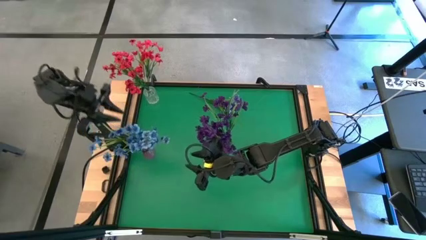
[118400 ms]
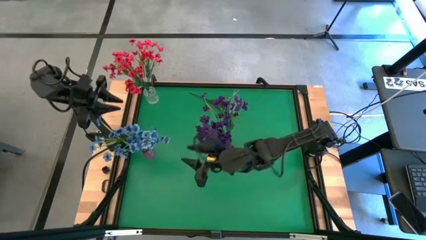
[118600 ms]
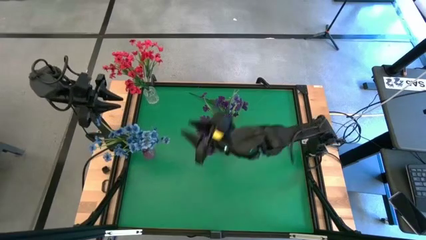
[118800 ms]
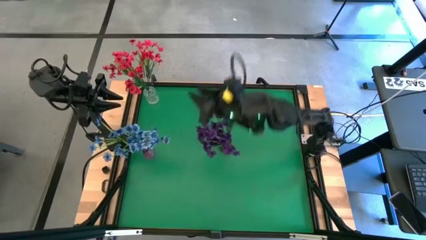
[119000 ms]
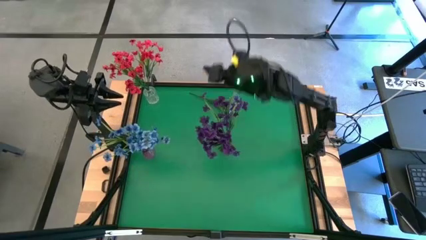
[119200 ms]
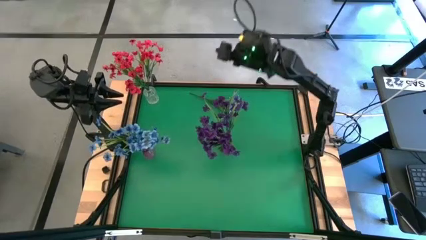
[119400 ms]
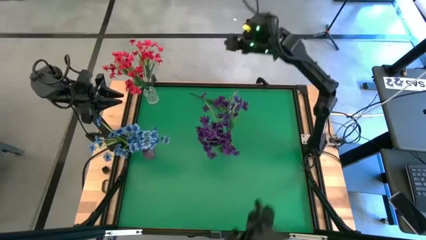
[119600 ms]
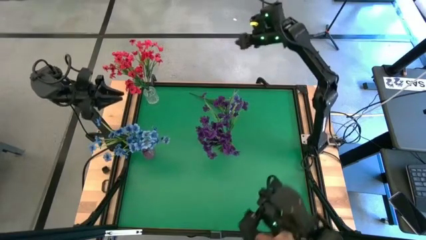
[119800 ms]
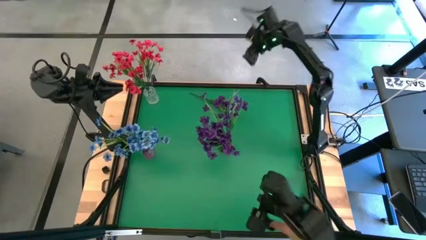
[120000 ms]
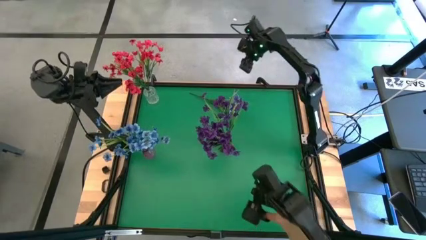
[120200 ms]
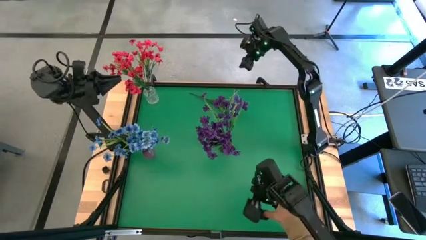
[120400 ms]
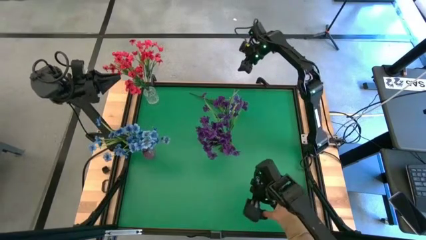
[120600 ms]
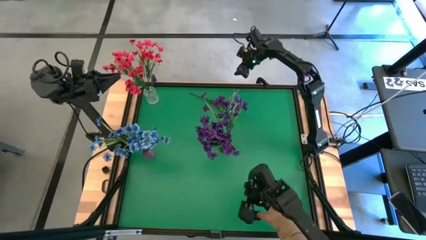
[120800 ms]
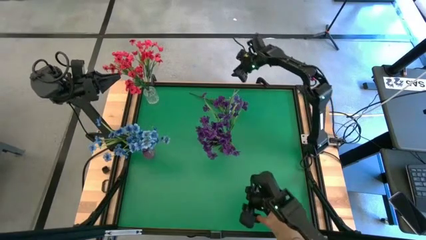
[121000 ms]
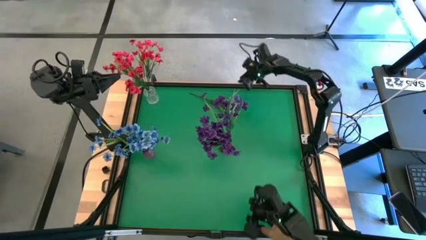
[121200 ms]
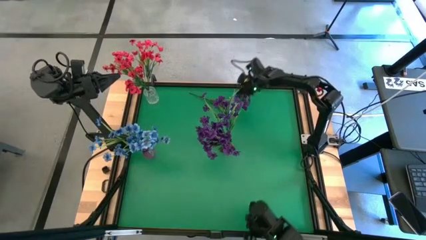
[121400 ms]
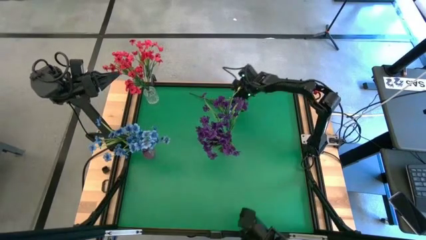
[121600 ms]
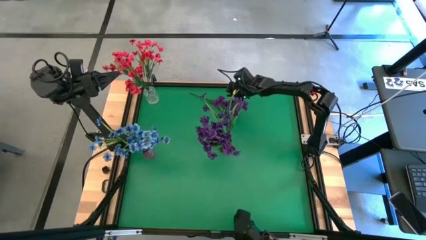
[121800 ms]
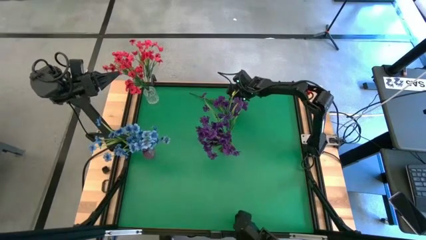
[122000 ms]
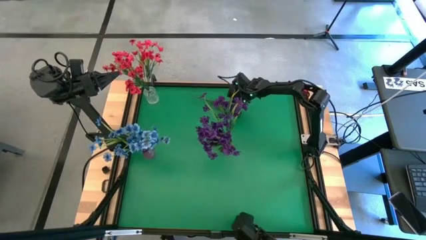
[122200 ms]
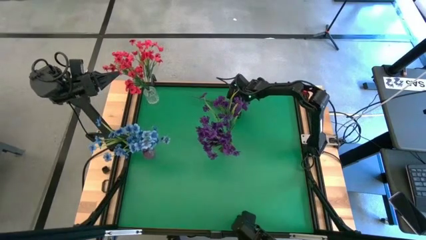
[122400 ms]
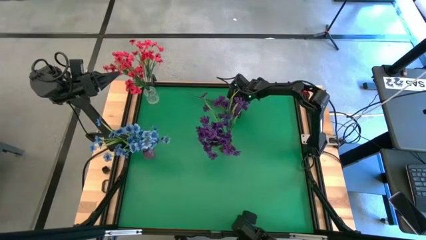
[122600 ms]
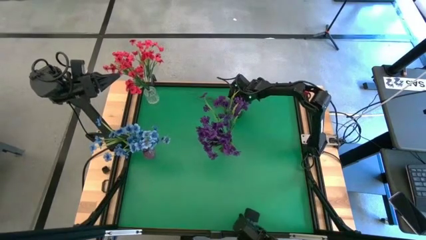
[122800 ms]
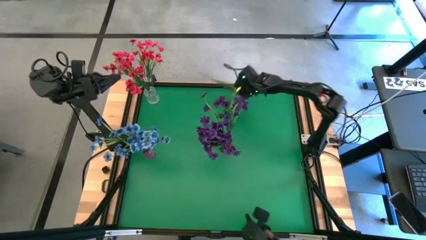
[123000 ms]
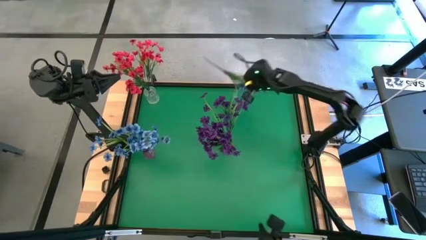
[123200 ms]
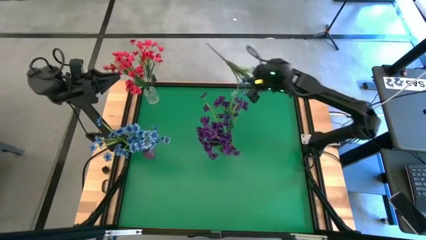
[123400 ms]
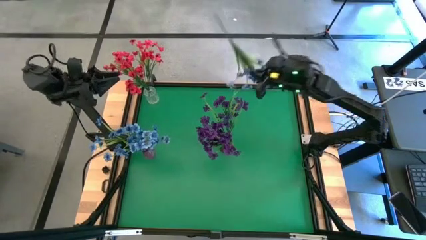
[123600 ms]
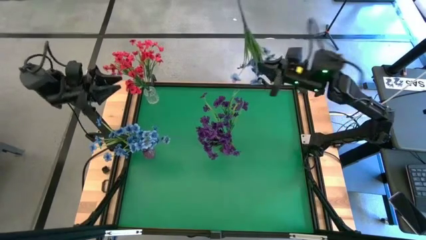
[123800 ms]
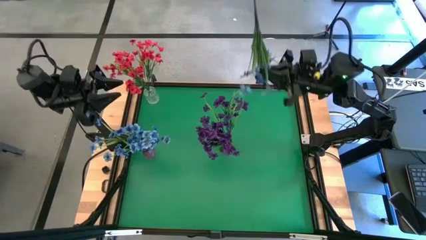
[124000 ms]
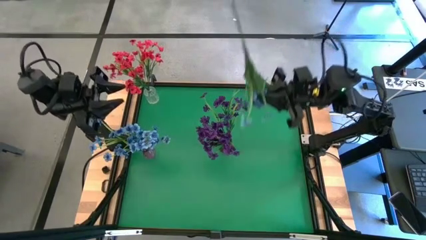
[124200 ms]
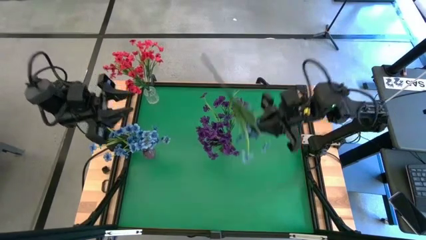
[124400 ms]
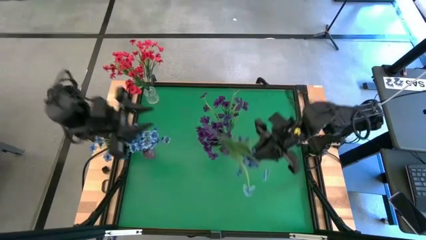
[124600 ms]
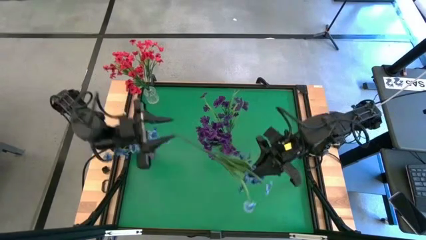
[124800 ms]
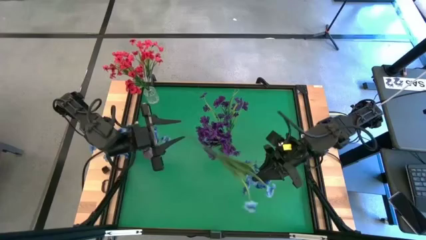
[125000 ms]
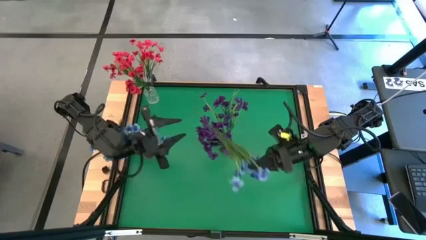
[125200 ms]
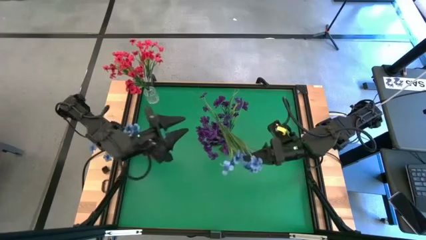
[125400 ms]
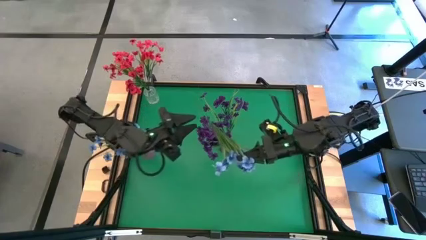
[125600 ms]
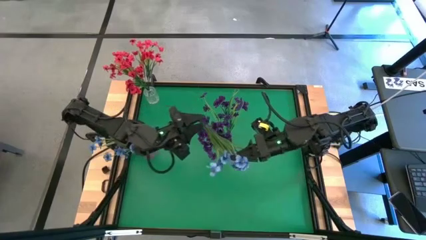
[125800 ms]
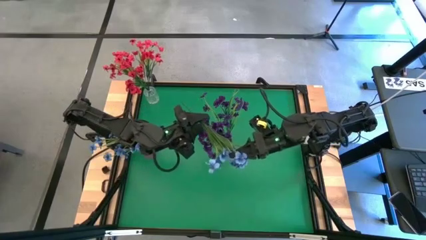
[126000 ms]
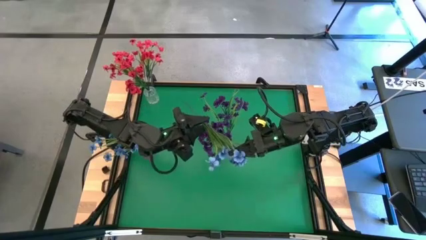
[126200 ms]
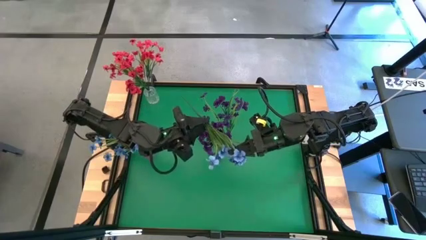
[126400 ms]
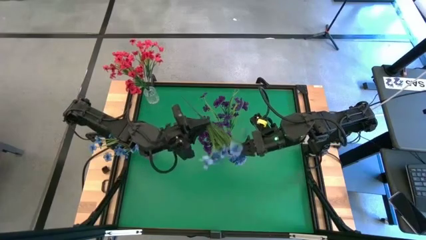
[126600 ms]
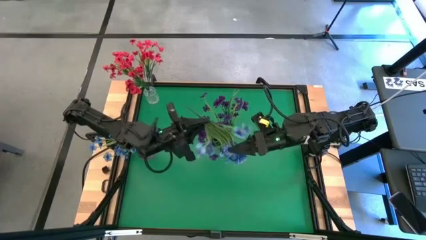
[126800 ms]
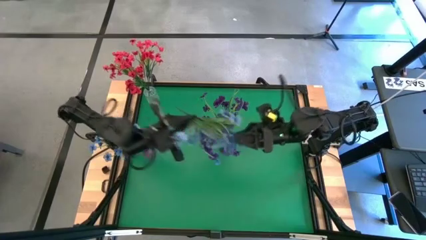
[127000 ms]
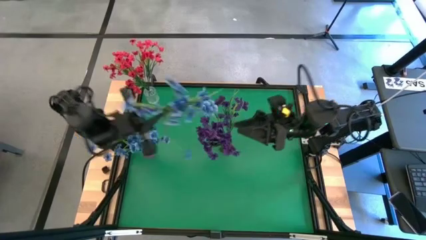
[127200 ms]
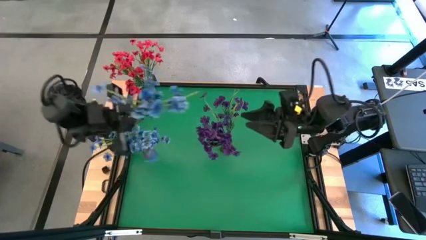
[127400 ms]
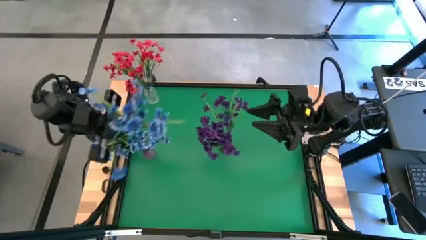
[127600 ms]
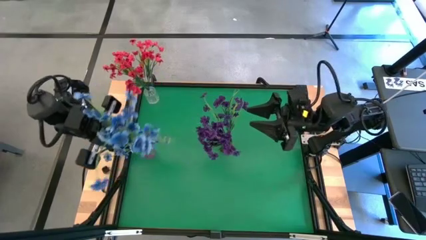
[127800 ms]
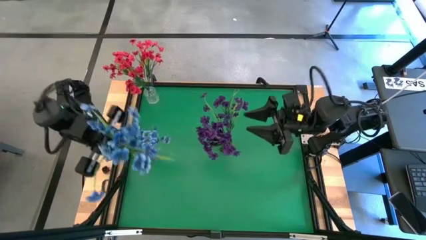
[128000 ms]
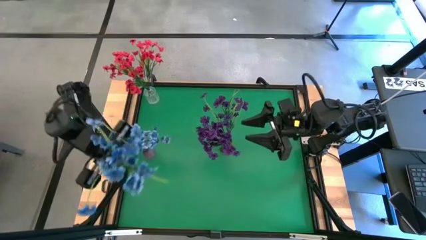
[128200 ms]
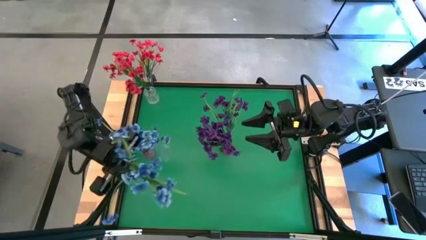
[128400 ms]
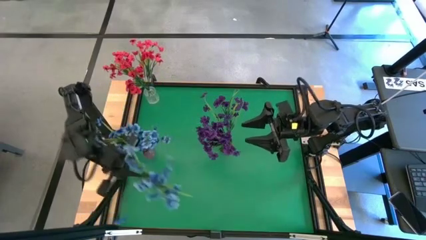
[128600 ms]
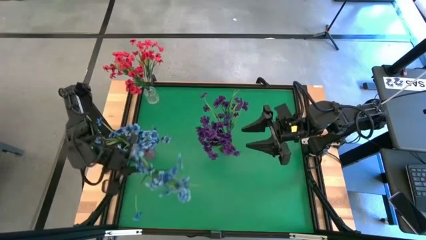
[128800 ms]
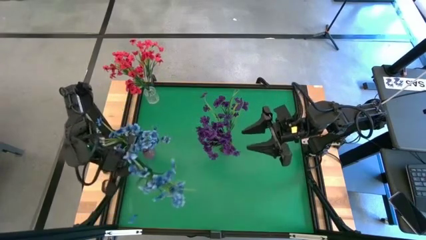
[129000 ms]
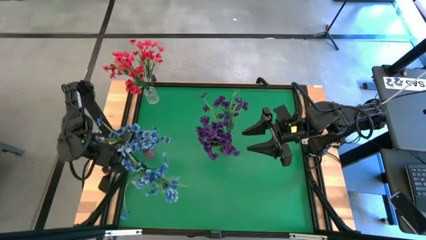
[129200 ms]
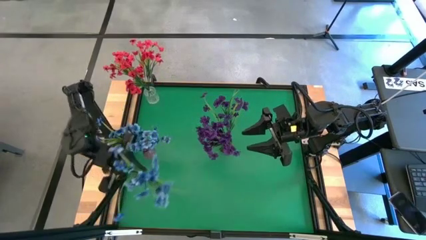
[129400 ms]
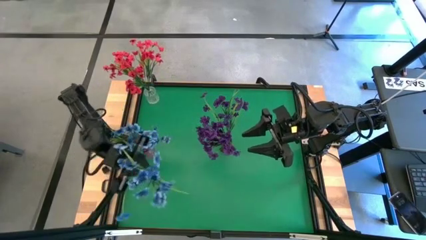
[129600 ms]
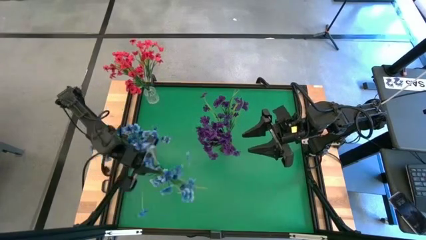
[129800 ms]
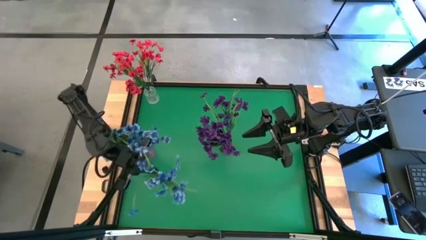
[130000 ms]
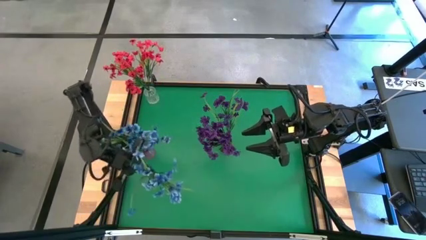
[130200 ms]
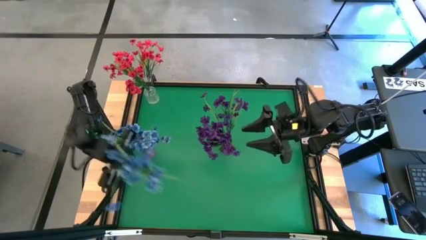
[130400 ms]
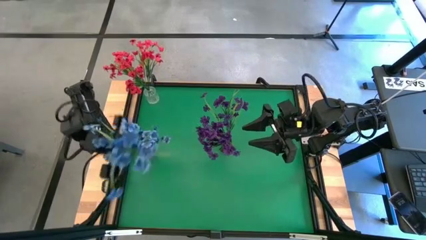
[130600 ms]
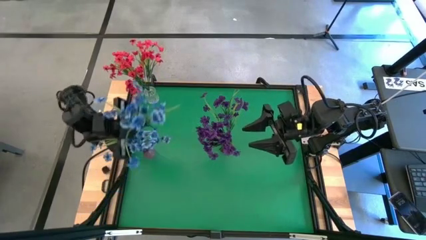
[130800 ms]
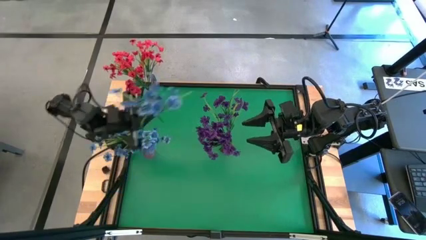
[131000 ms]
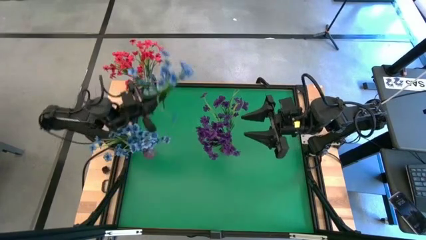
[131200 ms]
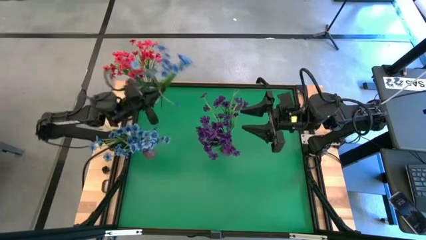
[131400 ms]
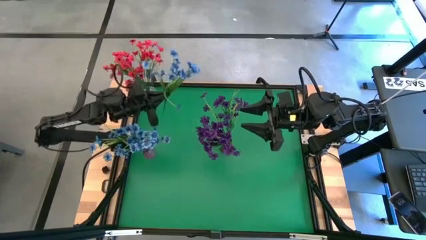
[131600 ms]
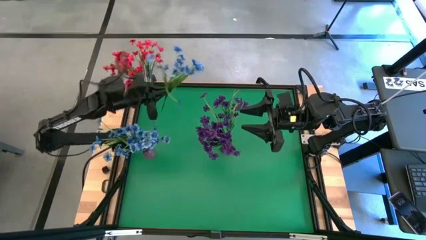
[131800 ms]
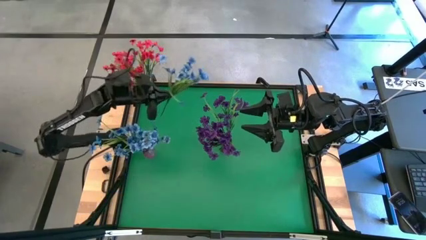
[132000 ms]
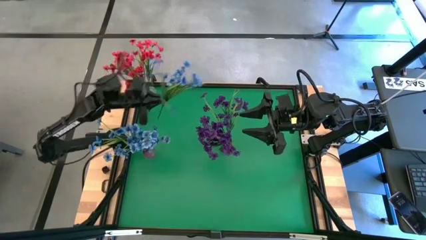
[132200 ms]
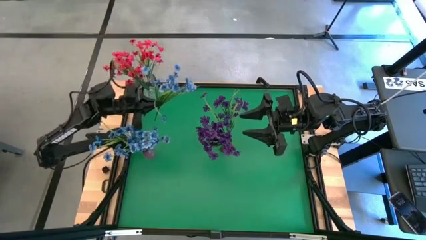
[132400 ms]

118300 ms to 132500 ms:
Task: Sort flowers into vase by color
Put the blue flowers into the violet vase

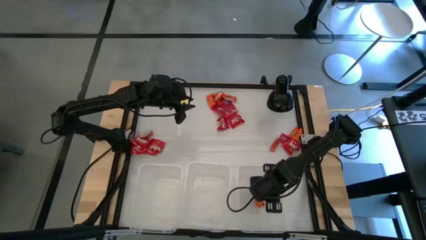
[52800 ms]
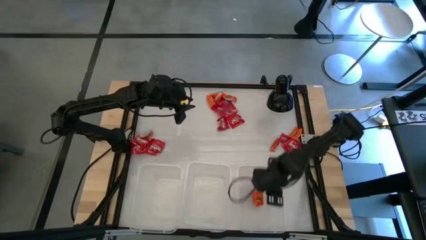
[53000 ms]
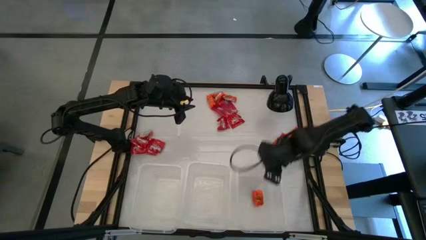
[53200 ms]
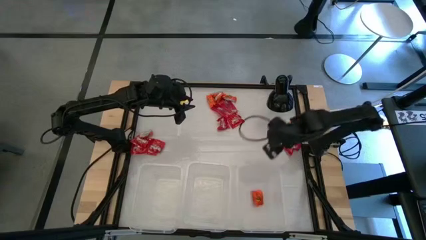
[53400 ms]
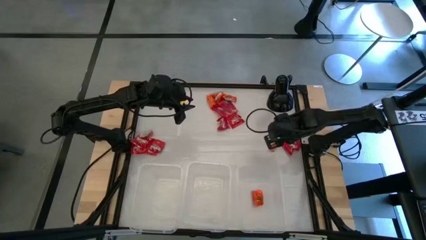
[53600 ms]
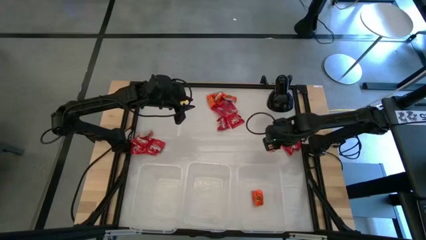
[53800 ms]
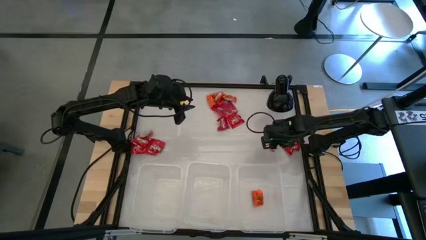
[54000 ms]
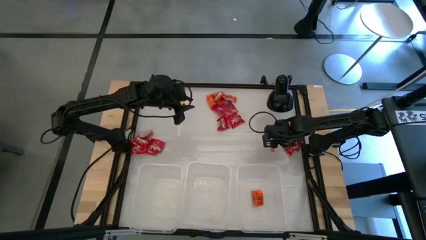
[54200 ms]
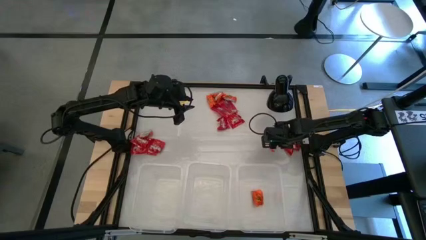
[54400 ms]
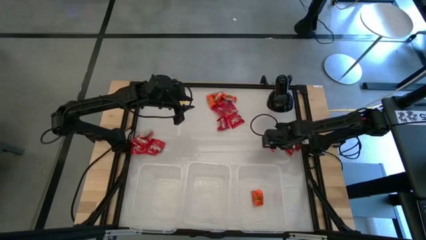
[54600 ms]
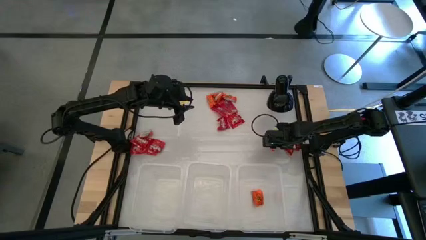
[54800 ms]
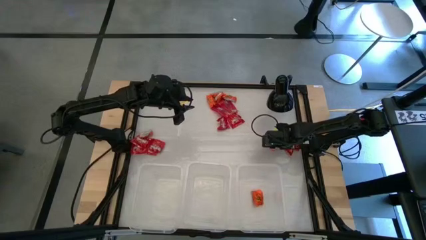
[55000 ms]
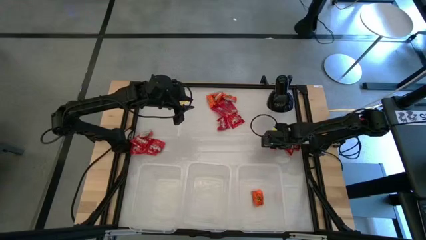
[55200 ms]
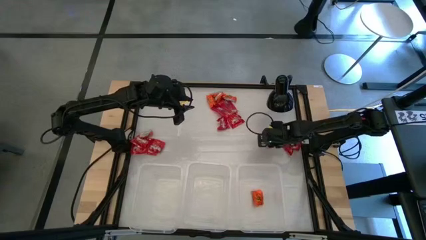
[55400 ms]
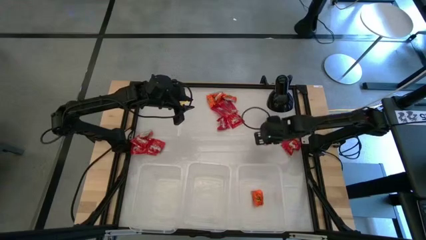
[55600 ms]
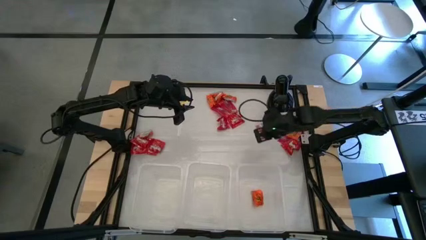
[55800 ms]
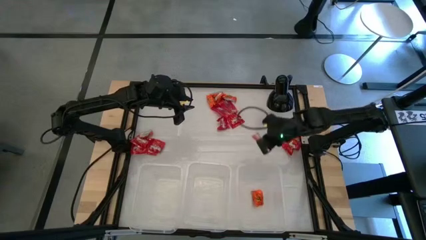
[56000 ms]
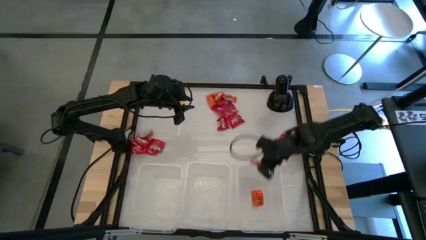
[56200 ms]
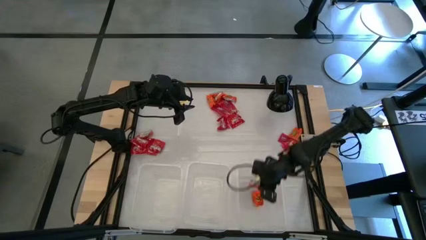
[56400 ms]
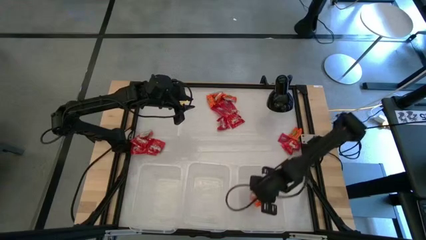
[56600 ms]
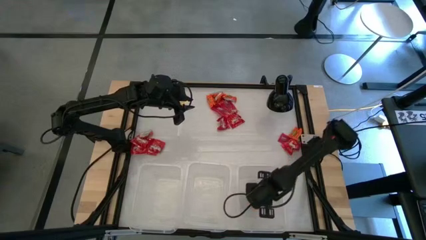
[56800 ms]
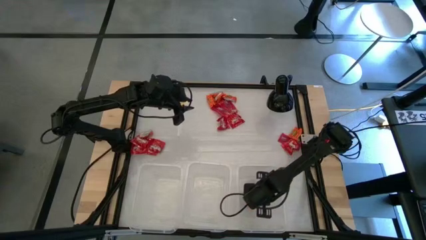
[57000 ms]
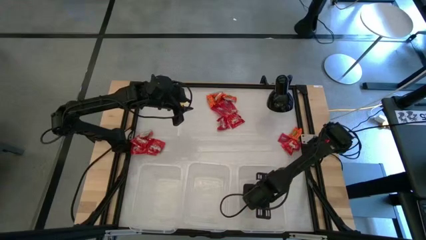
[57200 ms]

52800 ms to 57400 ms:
Task: Sort candy
Put the orange candy into the right transparent bin
